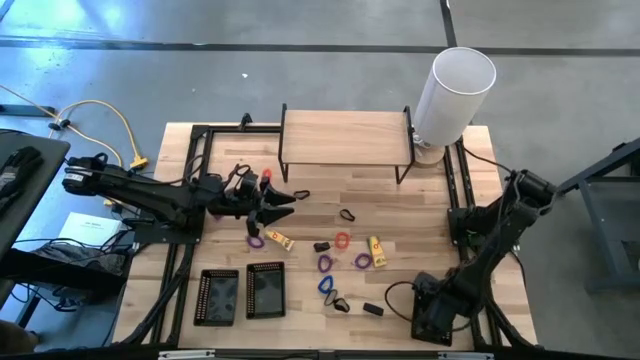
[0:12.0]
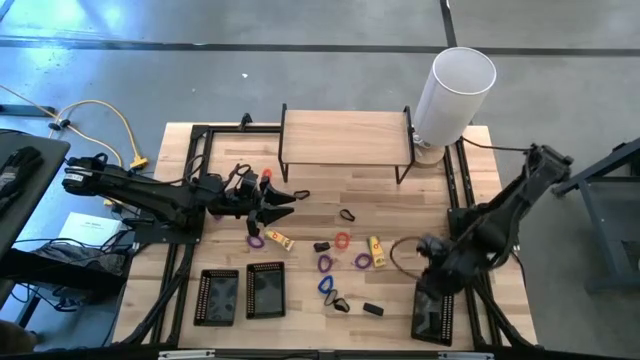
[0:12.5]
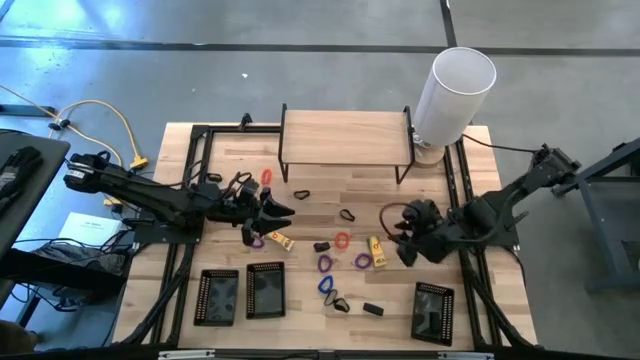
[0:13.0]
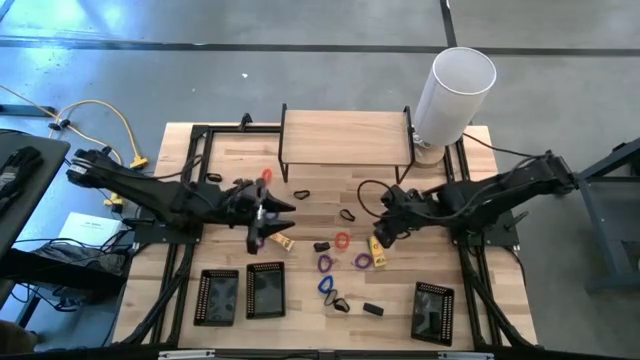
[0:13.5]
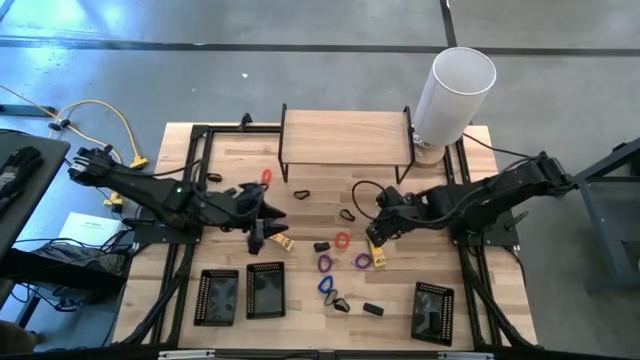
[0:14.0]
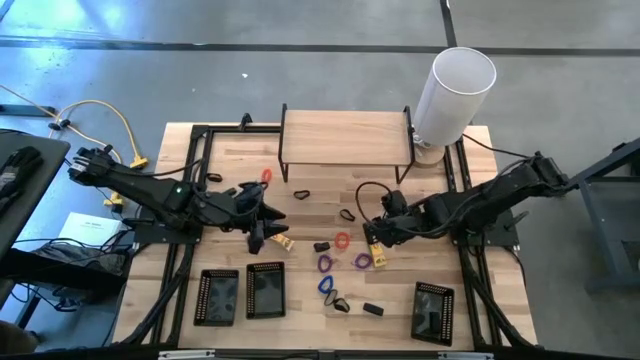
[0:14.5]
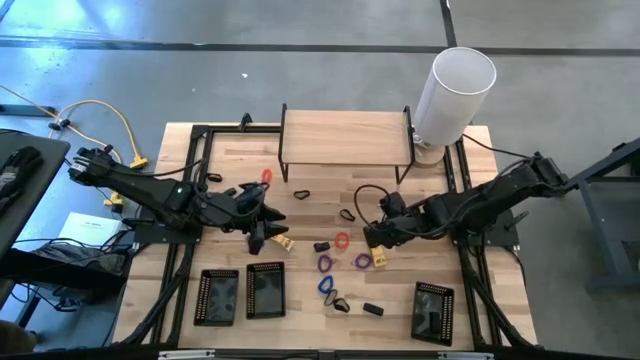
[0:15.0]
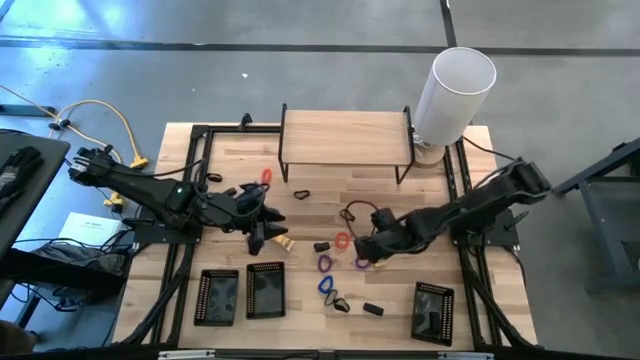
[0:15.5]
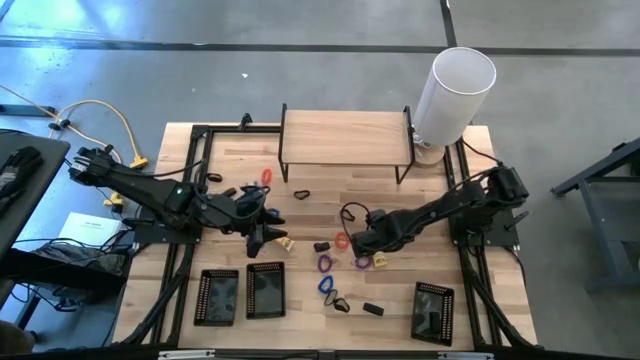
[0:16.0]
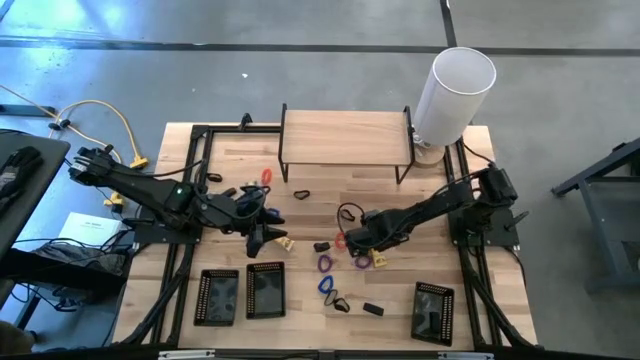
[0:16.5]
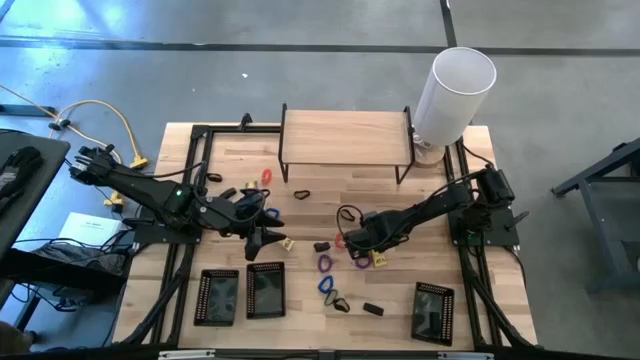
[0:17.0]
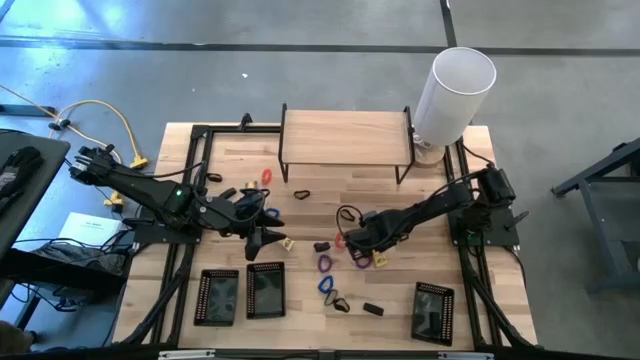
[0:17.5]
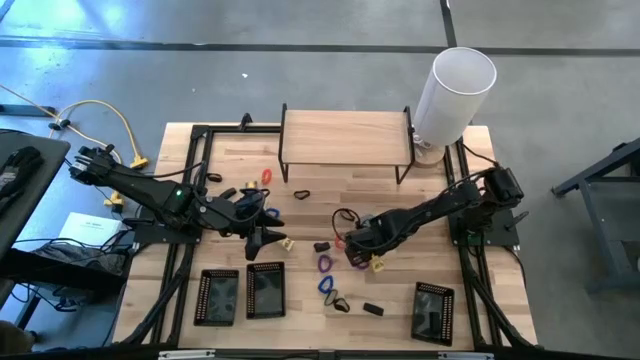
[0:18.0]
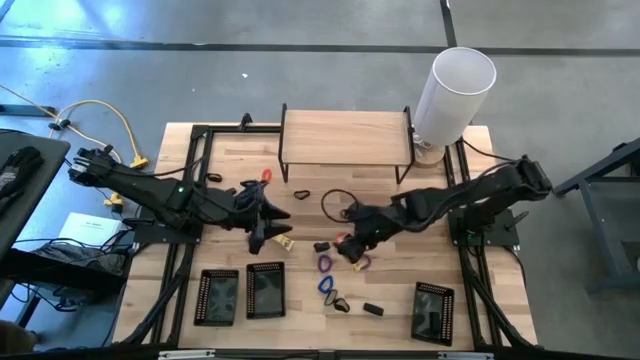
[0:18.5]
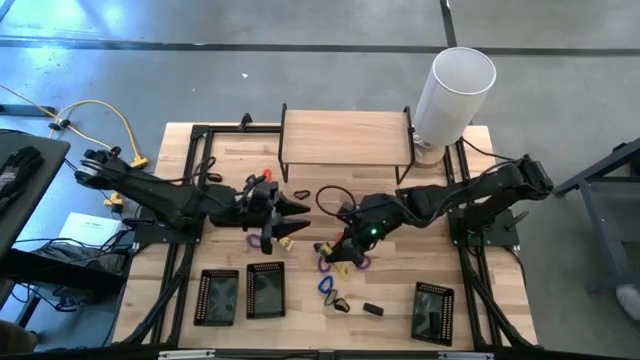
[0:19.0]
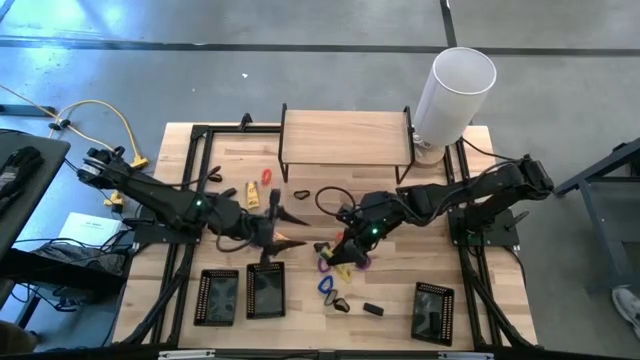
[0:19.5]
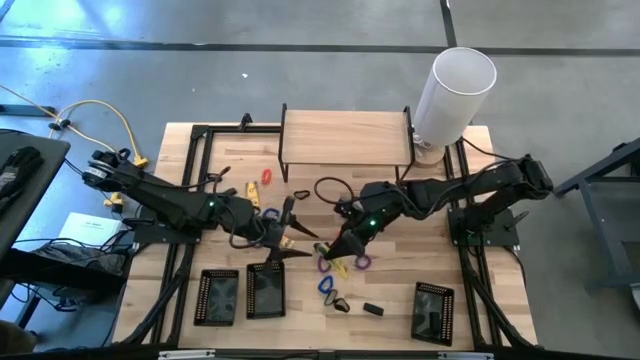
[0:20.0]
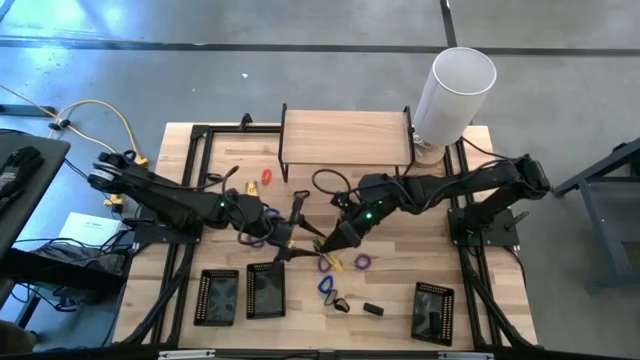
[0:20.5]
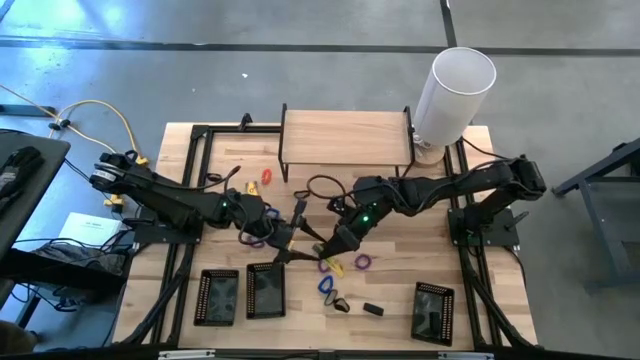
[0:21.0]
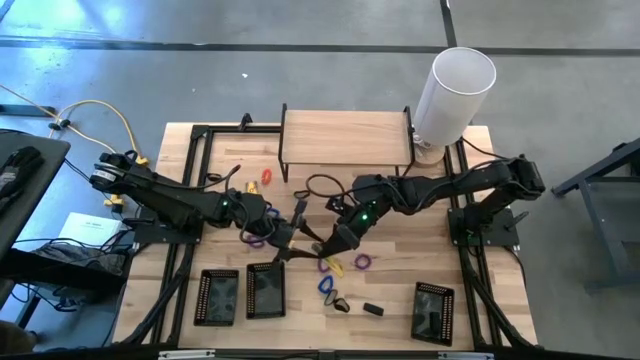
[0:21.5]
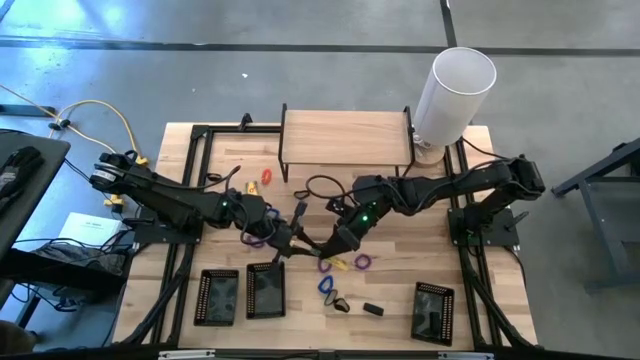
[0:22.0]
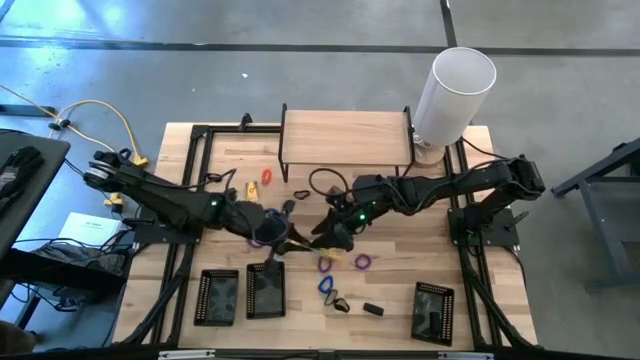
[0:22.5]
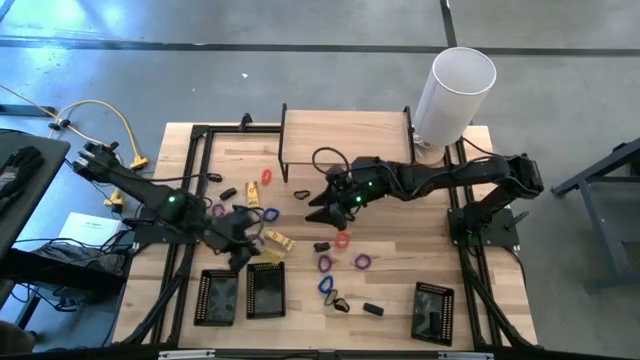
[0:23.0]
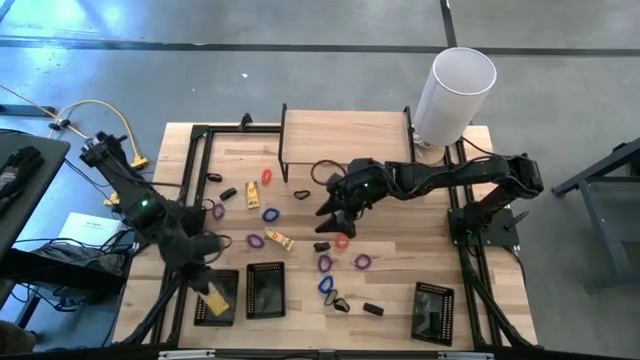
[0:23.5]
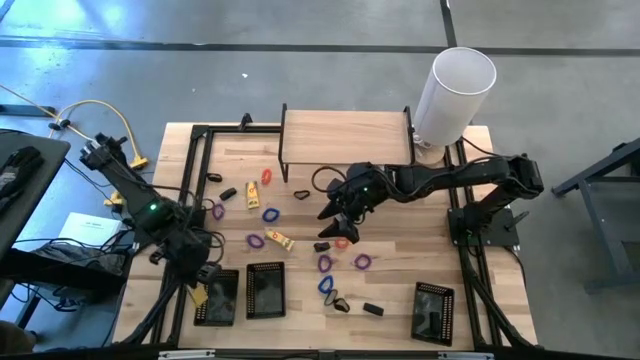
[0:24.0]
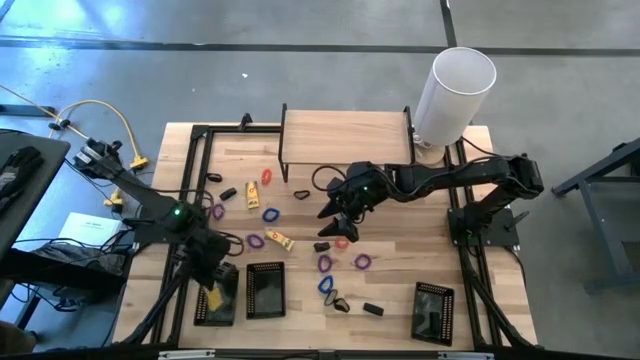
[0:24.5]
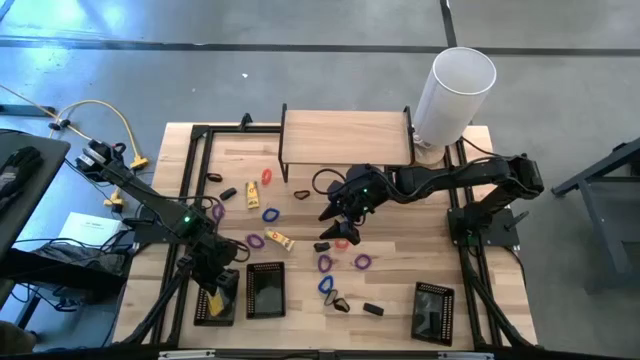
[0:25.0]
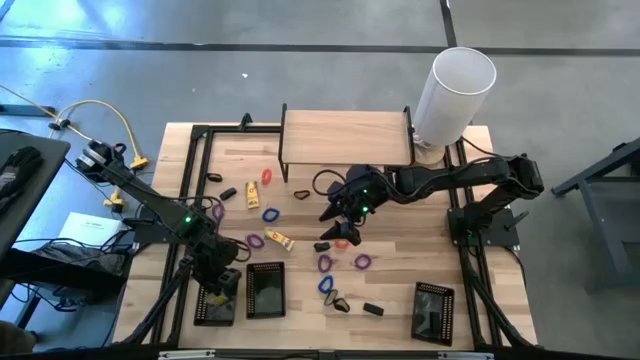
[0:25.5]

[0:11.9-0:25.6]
Task: Pick & Place Office Desk Supplies
Put the crayon box into the left black basket

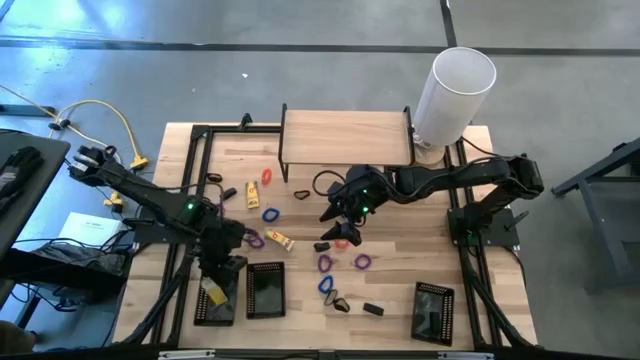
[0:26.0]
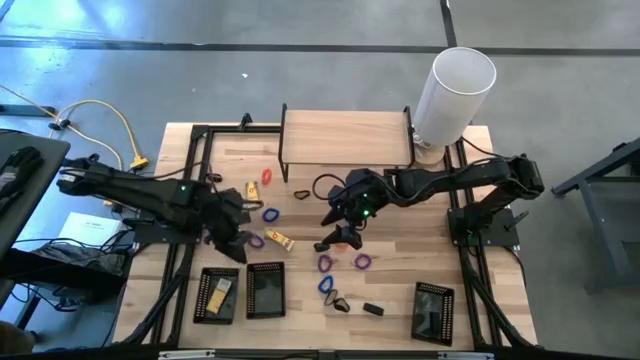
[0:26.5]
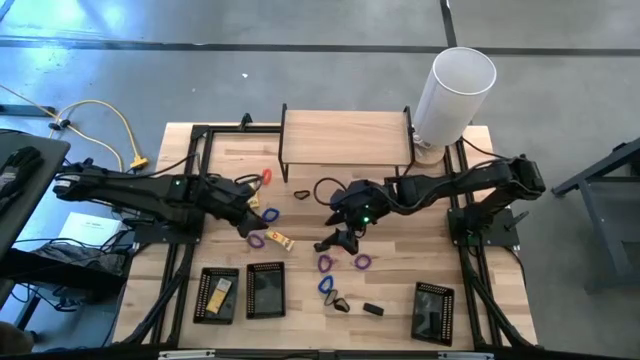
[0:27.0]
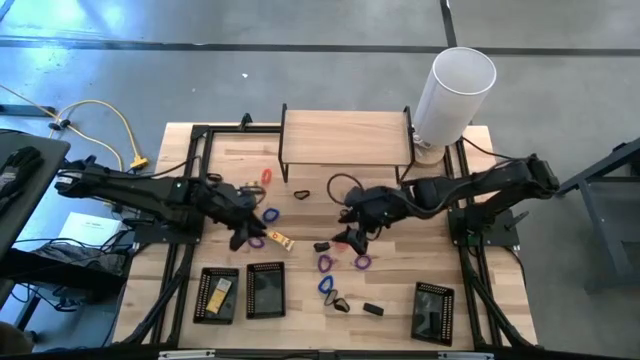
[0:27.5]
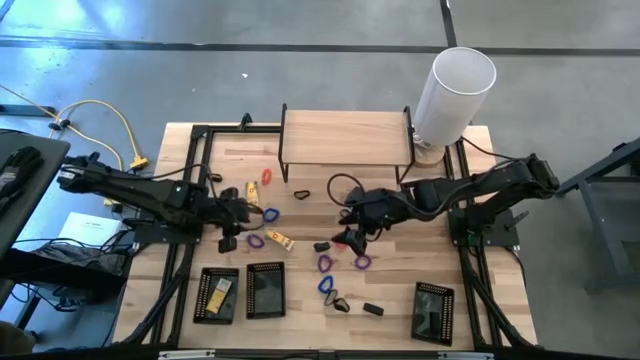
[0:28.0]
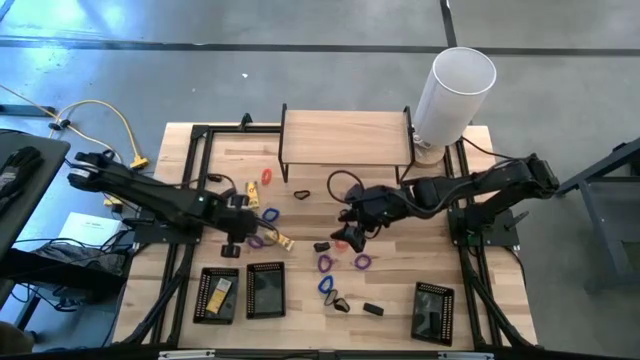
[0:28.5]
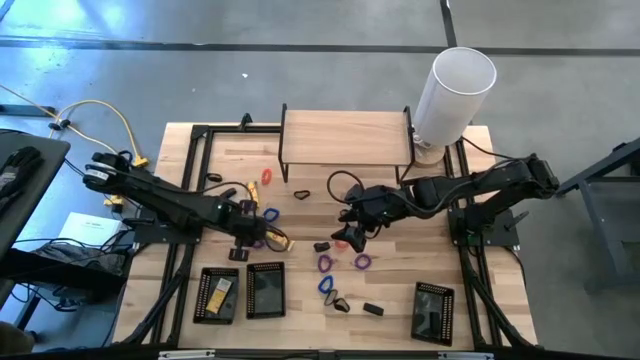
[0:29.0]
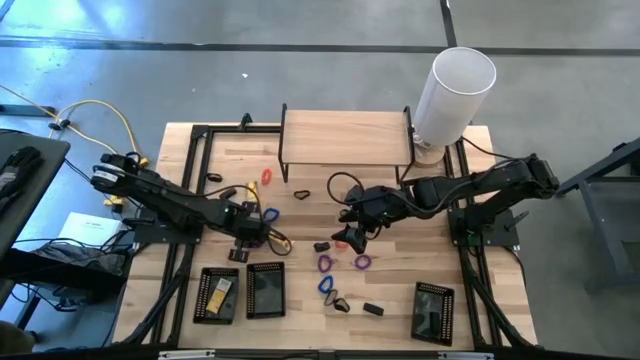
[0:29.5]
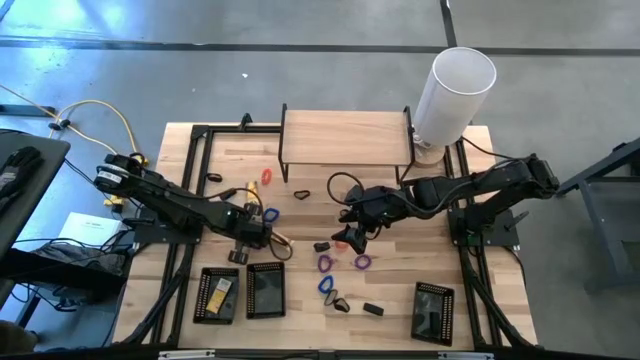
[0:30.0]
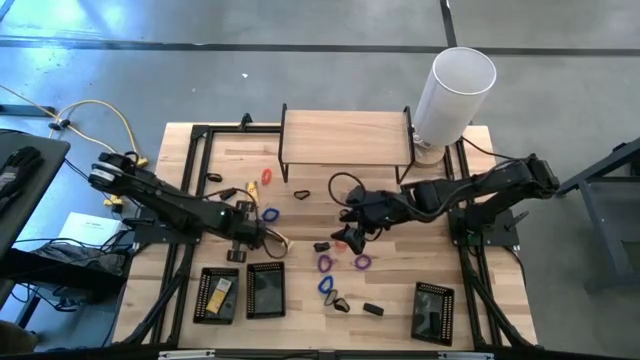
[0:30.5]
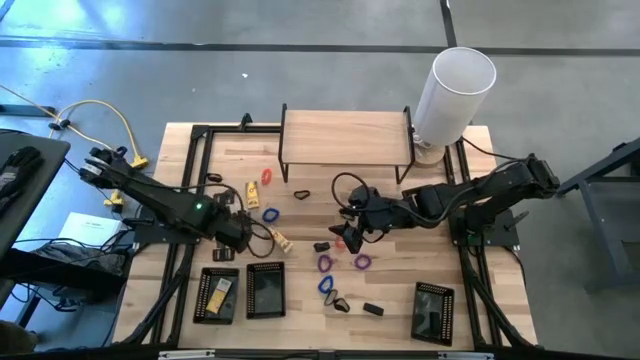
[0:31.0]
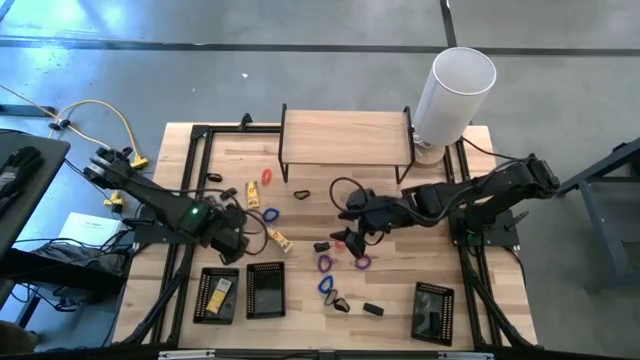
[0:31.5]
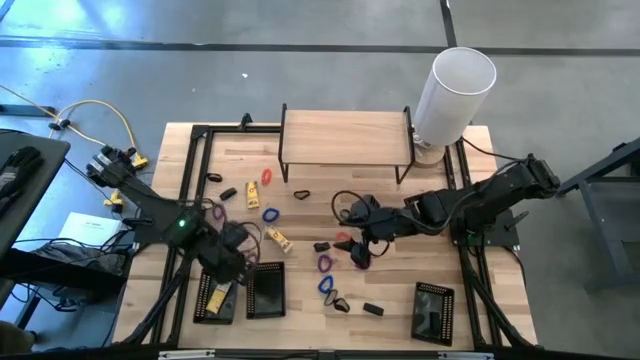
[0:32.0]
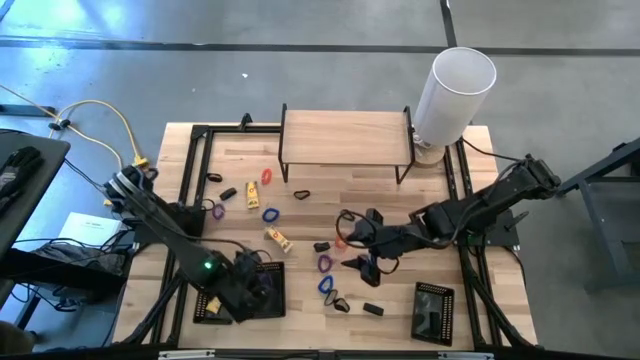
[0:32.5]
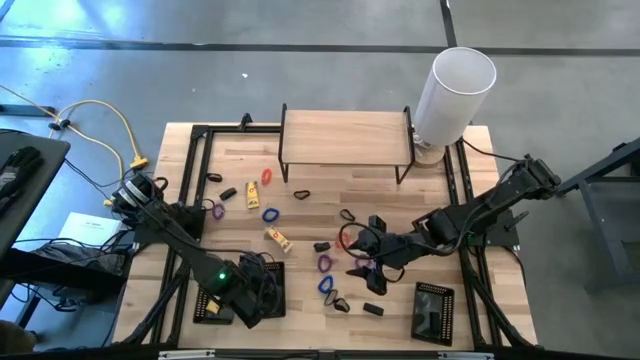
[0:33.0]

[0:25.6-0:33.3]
Put the violet spring key chain into the middle black basket
